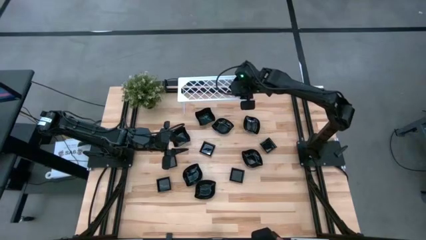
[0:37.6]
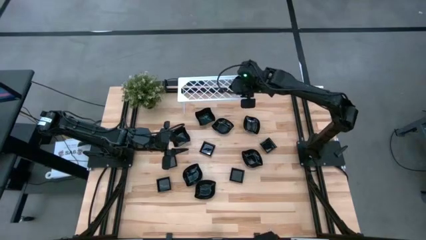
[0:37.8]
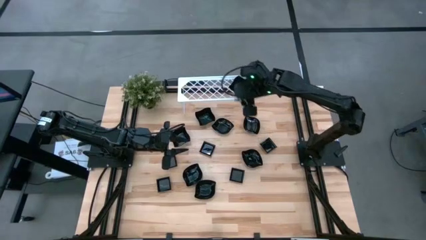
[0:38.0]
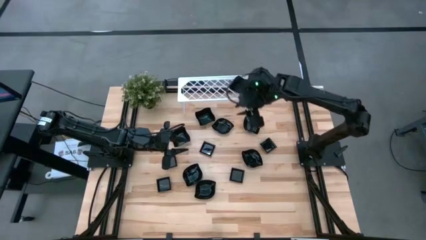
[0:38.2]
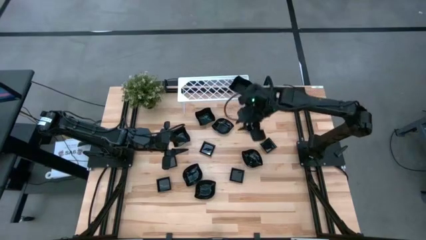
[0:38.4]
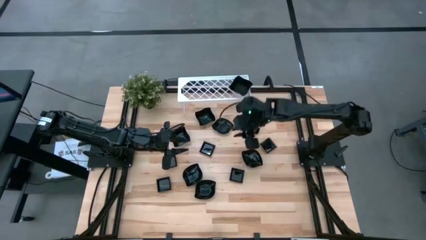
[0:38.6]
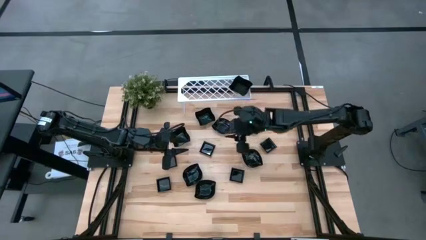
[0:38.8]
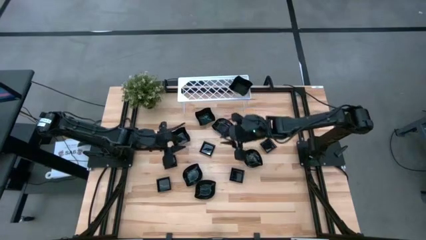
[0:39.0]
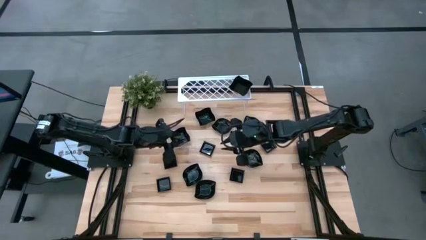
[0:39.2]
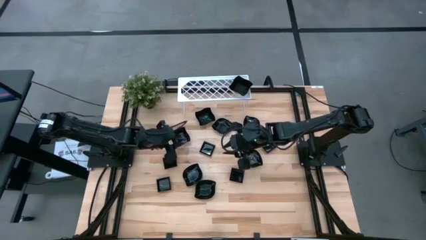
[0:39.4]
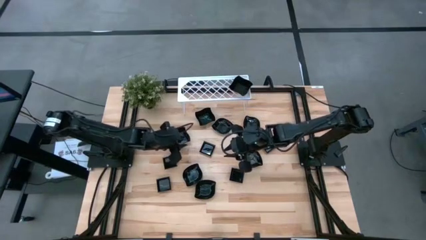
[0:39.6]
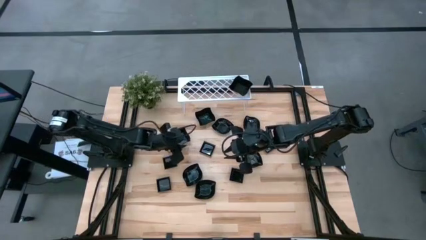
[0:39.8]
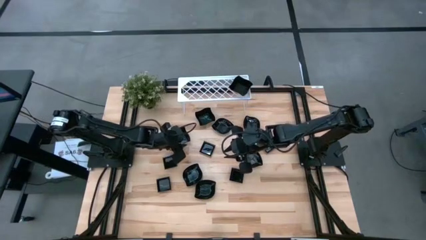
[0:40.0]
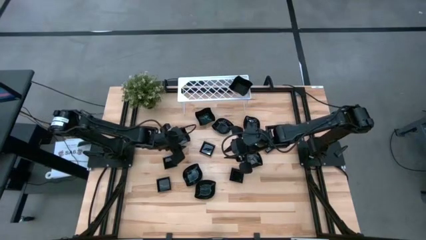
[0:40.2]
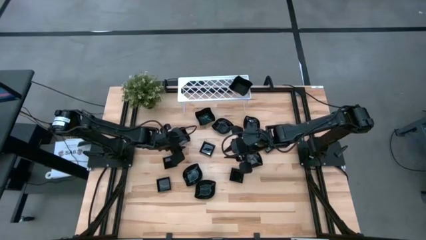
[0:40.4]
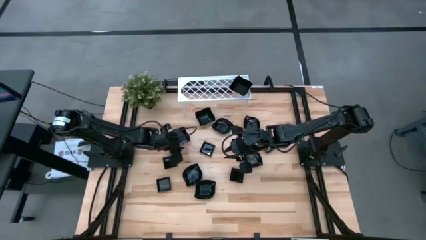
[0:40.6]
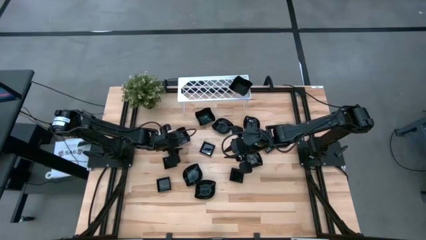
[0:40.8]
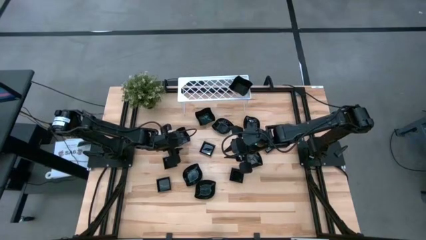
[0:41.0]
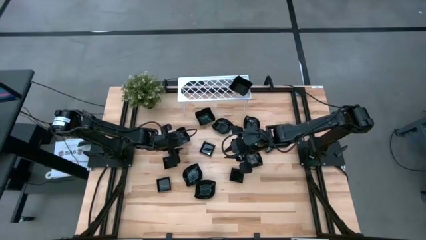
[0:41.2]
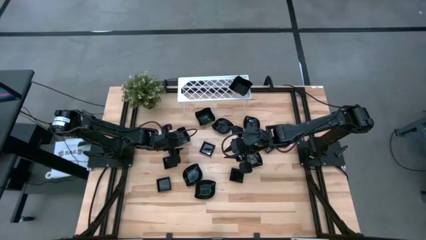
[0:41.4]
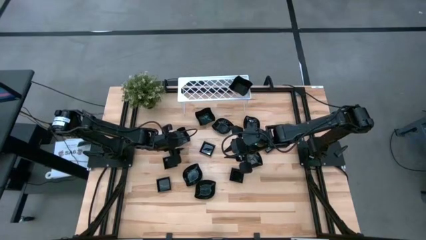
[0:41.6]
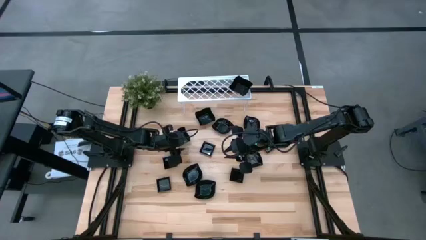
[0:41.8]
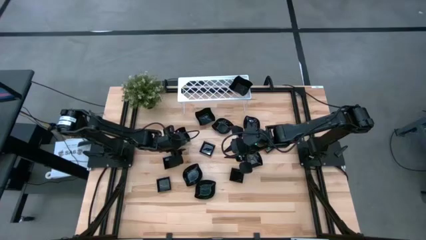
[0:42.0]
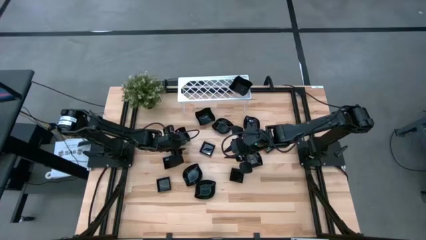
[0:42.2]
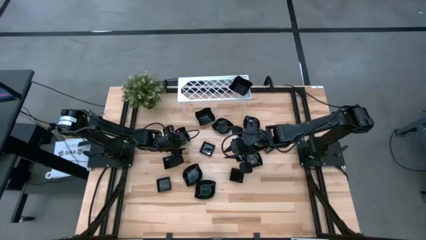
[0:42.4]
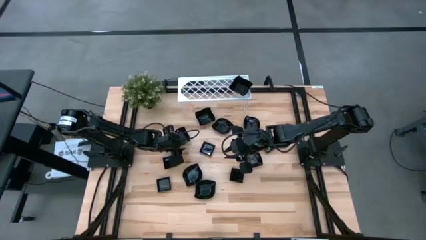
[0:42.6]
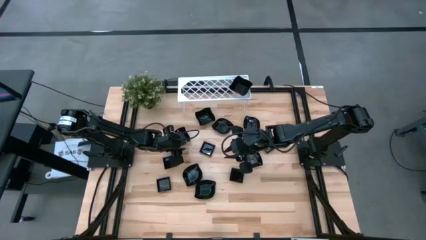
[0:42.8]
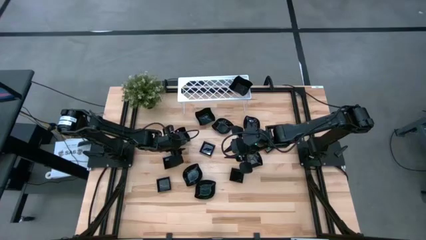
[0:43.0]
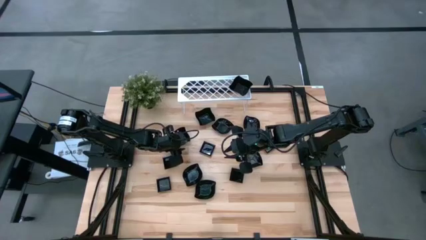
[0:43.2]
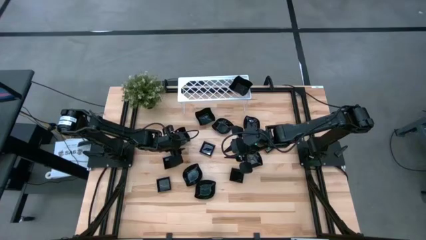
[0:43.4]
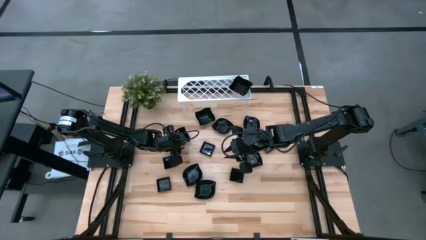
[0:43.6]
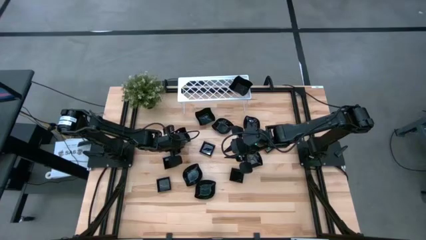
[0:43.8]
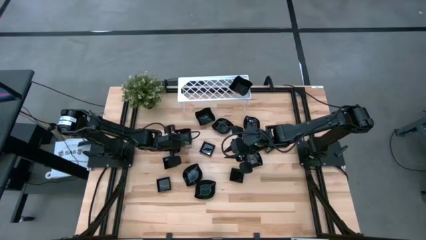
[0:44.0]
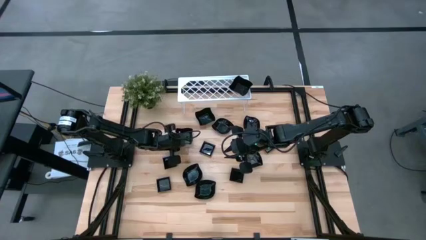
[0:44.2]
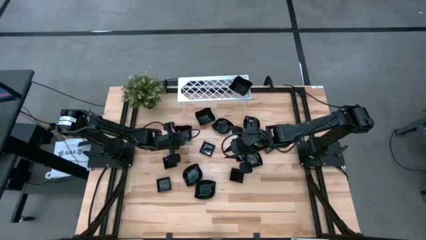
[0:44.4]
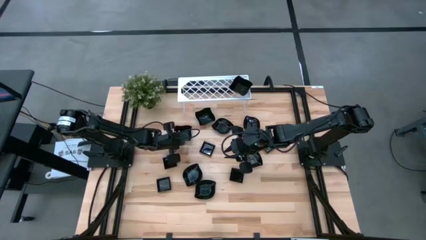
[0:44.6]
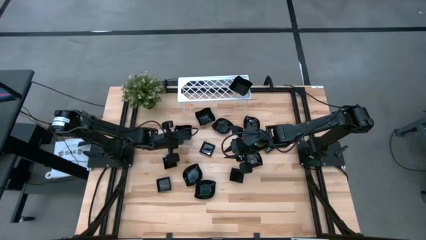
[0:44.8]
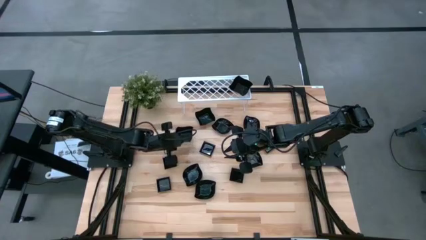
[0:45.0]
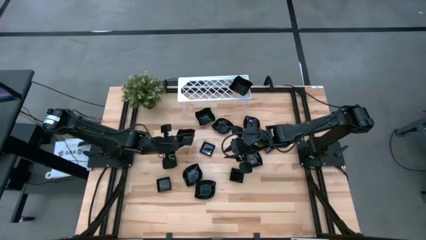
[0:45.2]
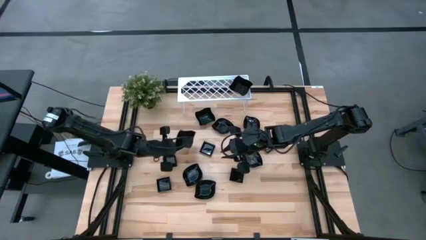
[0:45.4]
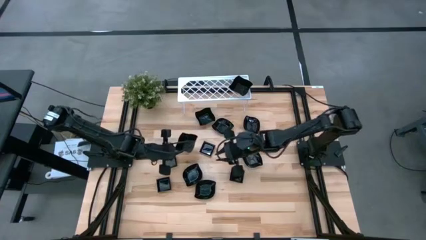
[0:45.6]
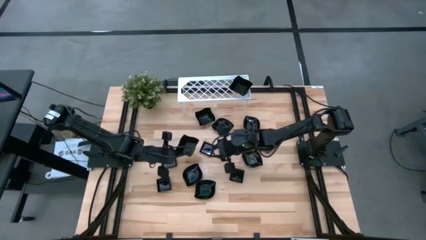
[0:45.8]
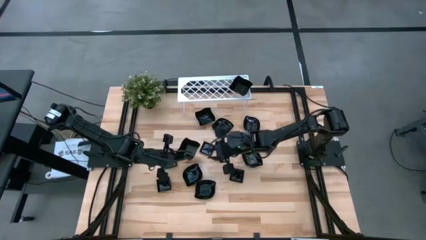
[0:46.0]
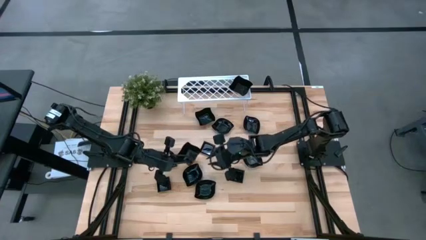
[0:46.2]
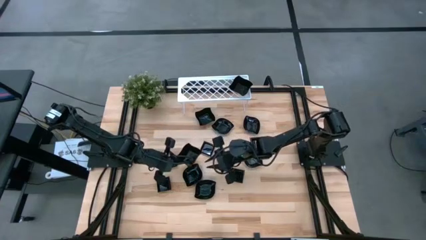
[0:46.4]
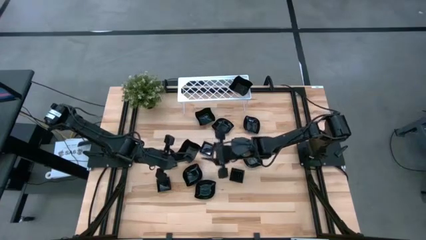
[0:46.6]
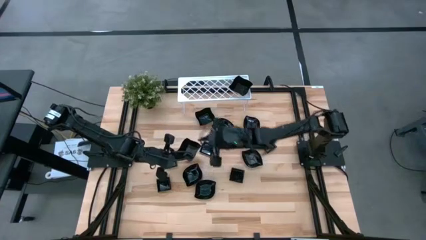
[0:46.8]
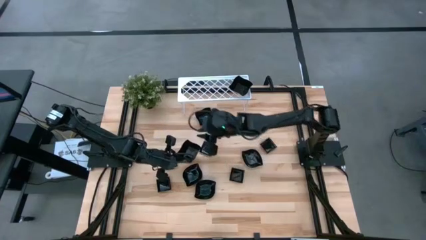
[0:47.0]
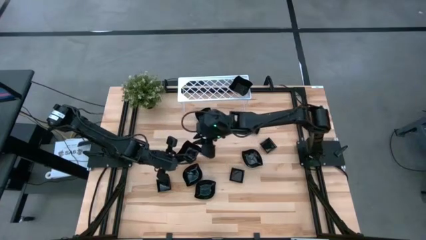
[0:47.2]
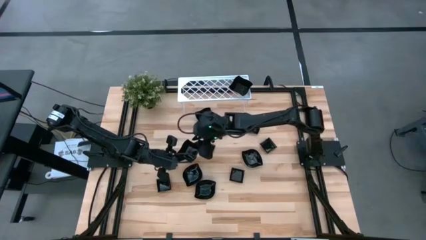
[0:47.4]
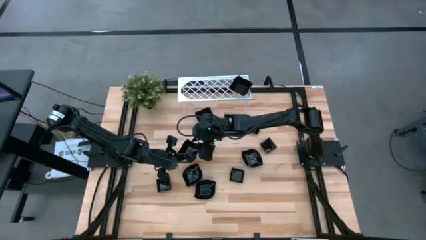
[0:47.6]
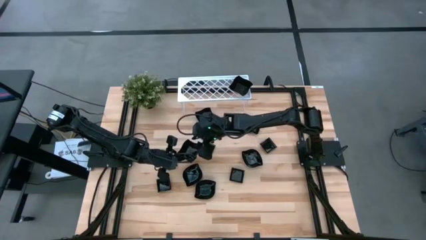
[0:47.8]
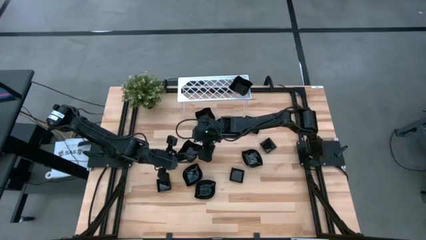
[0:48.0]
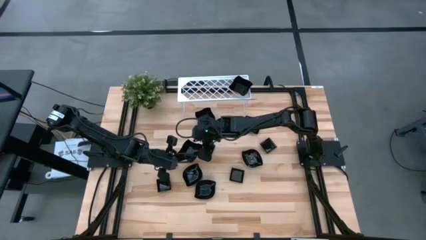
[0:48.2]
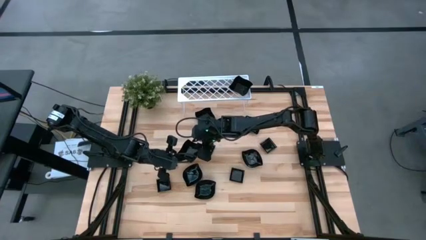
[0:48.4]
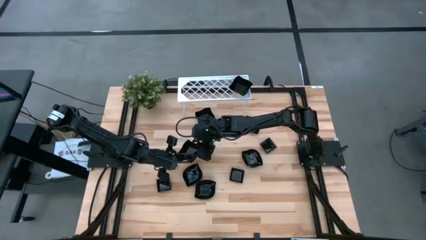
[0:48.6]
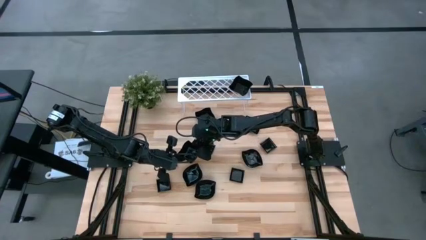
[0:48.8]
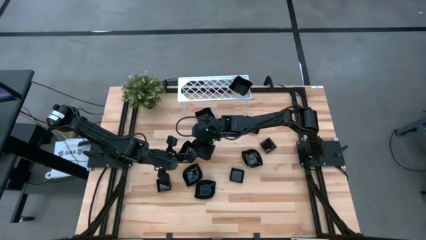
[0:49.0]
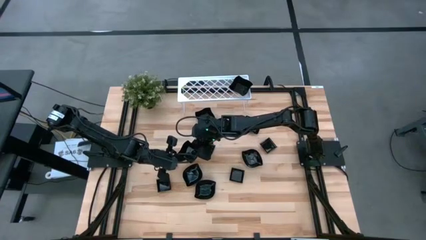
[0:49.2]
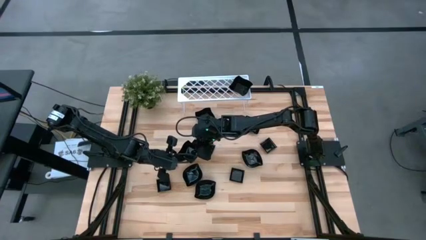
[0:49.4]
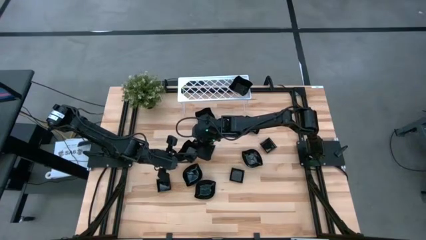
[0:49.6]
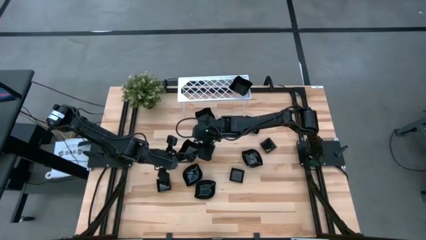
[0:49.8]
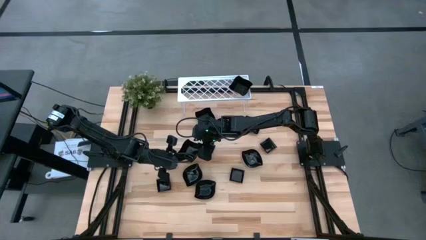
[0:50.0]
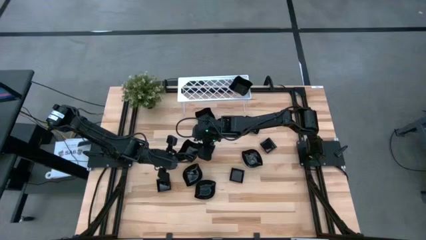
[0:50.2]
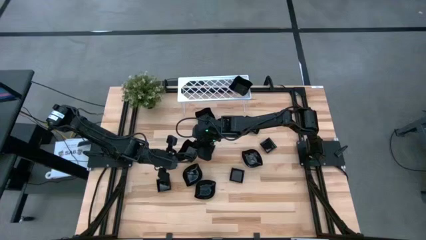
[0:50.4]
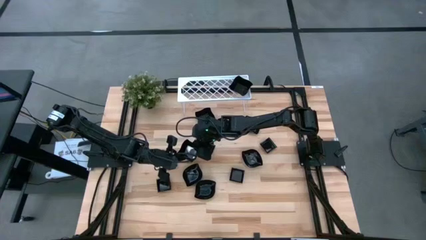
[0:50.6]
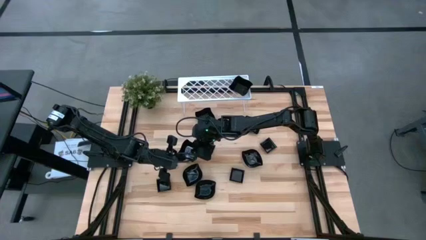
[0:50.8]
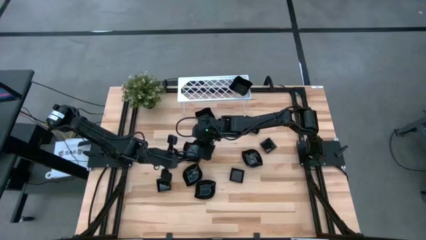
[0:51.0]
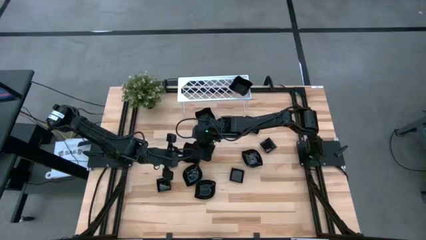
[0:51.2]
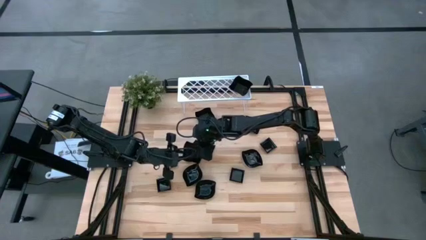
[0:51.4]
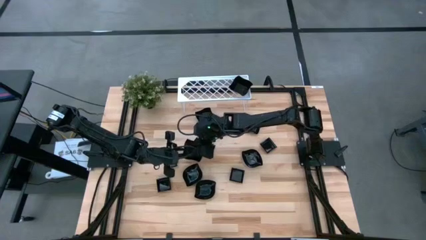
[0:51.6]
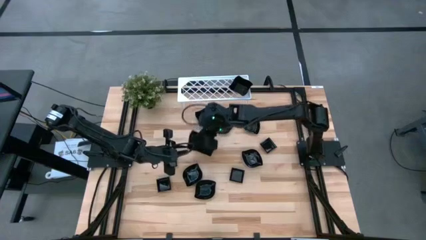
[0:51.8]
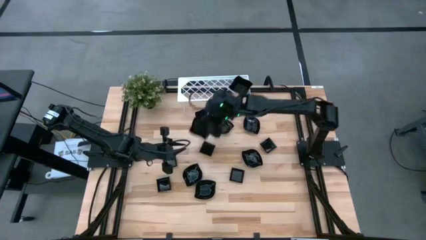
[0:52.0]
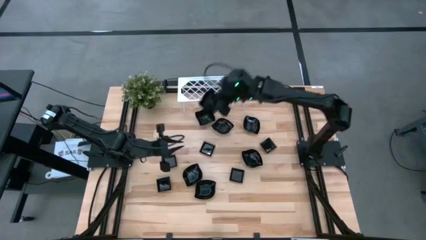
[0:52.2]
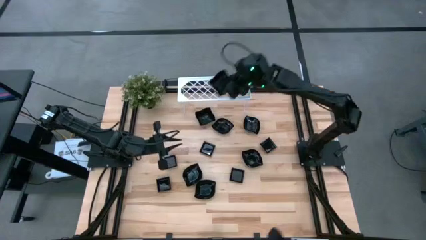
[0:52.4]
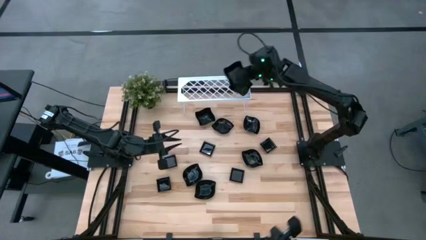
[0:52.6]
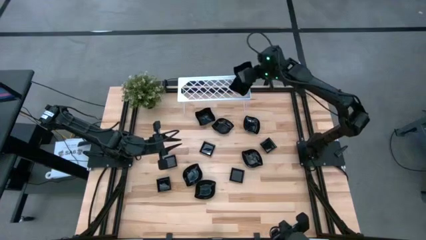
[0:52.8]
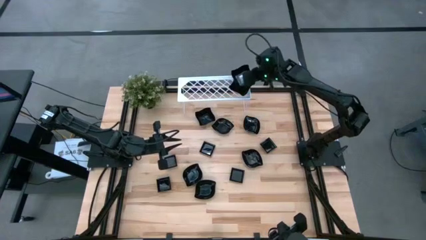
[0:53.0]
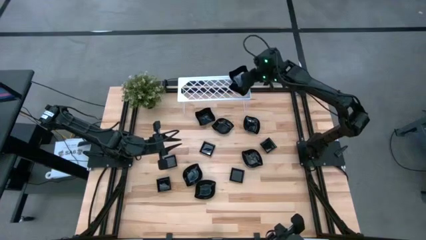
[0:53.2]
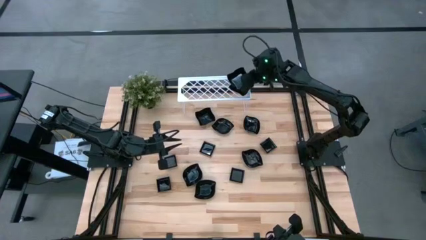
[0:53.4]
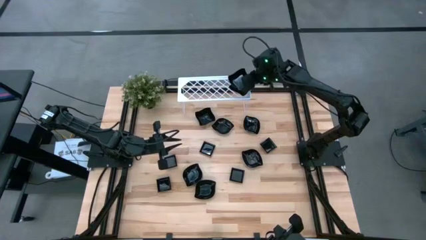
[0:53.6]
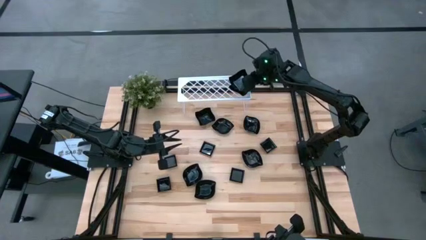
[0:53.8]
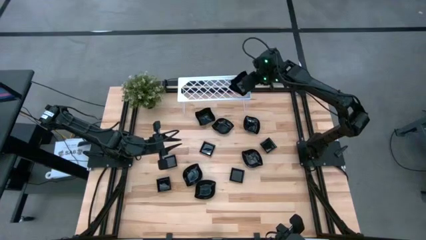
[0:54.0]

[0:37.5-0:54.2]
Task: Pick & Place Mini shaped plates
Stack the black distorted square plate on top of the black distorted square plate on the shelf
